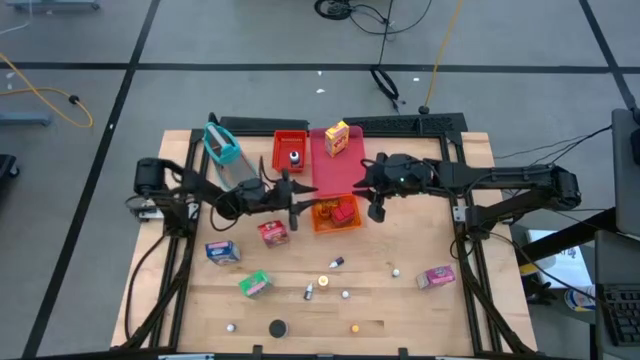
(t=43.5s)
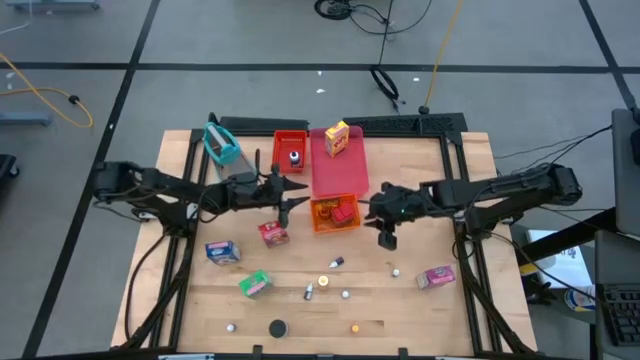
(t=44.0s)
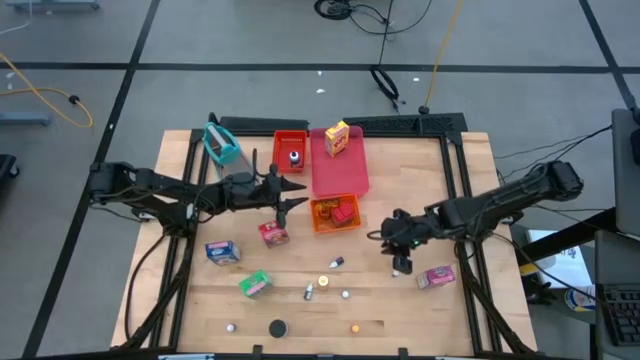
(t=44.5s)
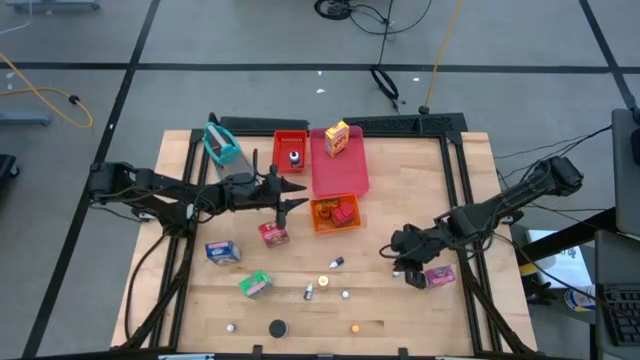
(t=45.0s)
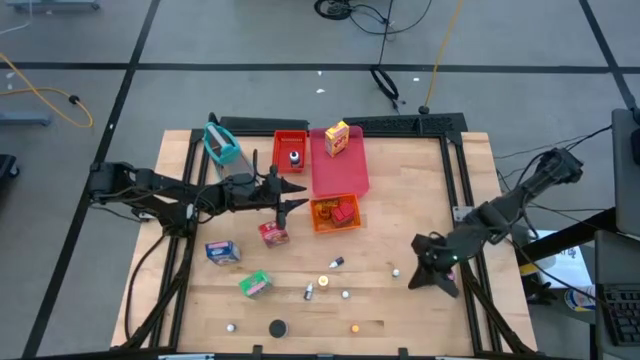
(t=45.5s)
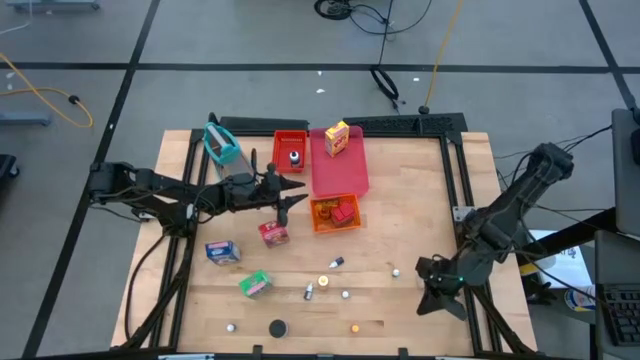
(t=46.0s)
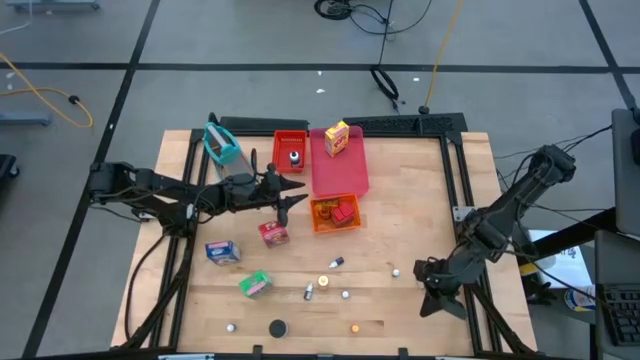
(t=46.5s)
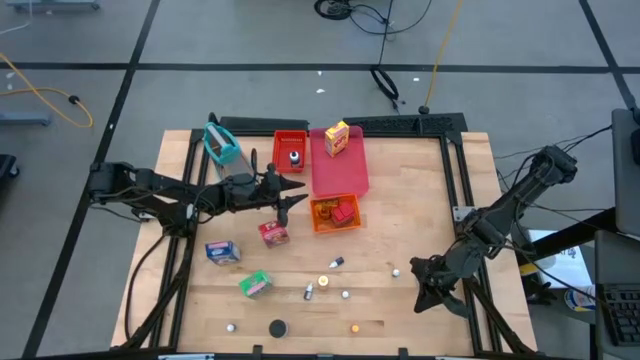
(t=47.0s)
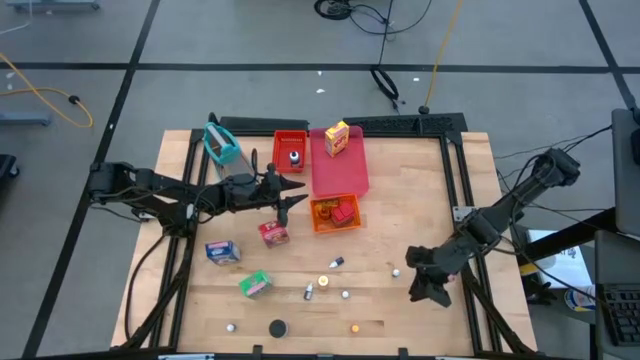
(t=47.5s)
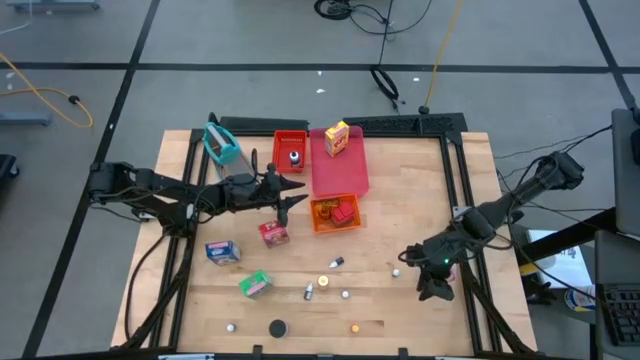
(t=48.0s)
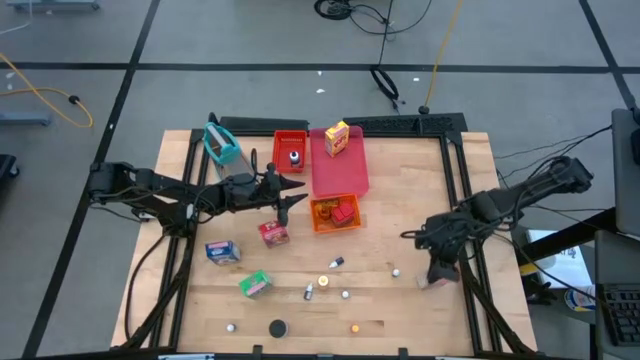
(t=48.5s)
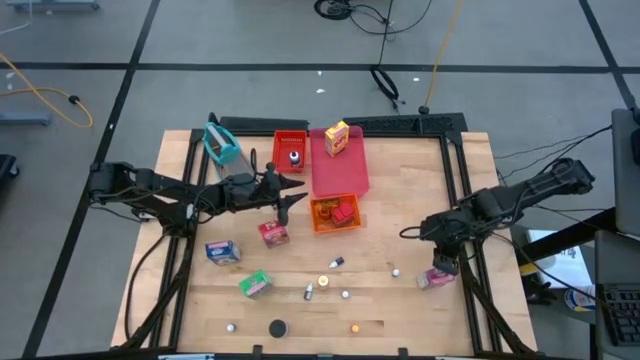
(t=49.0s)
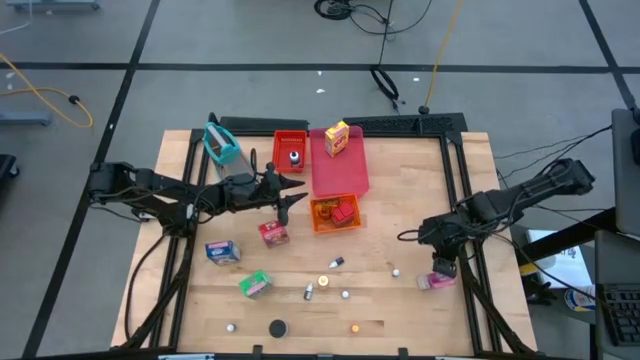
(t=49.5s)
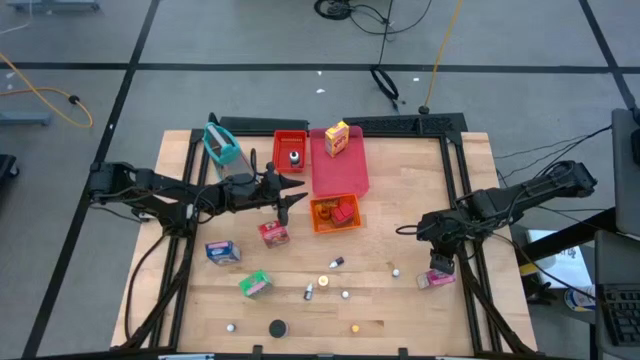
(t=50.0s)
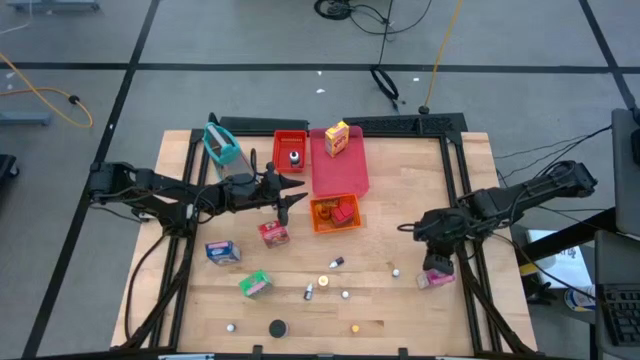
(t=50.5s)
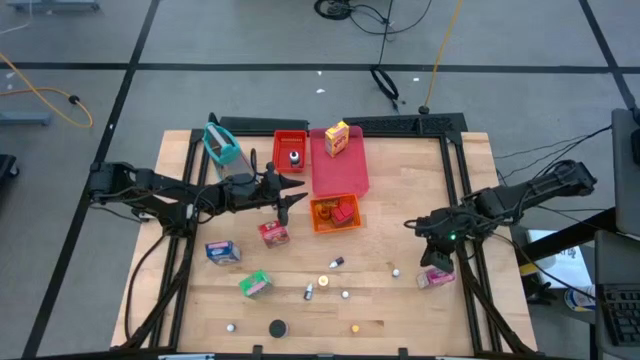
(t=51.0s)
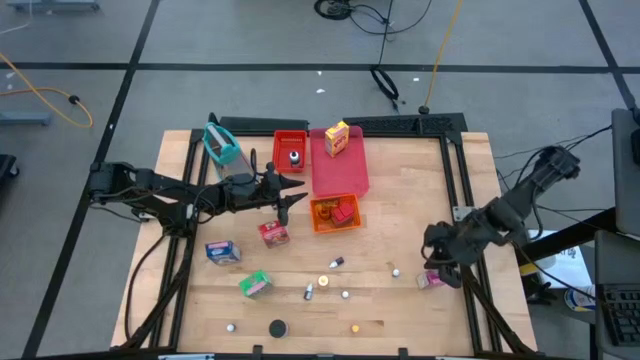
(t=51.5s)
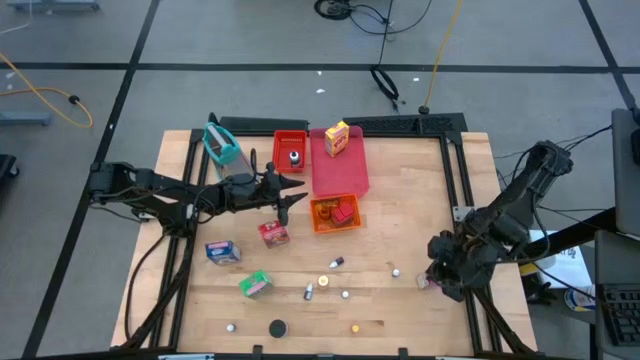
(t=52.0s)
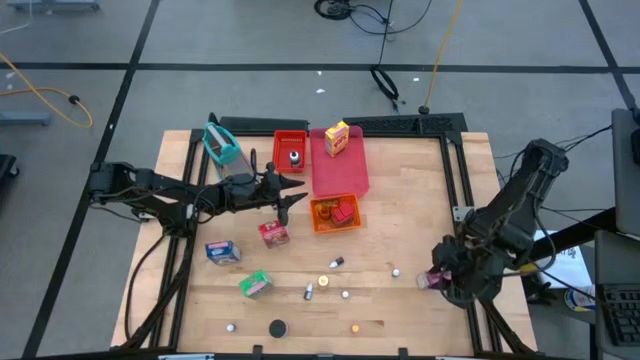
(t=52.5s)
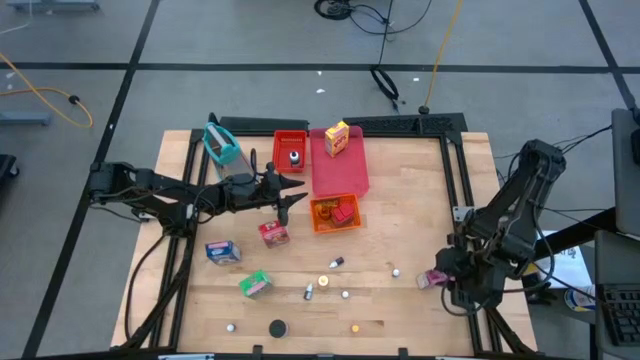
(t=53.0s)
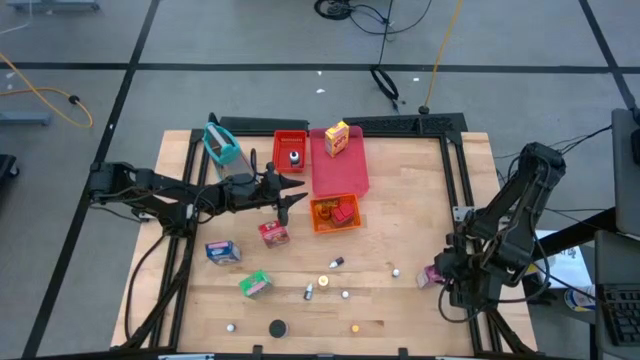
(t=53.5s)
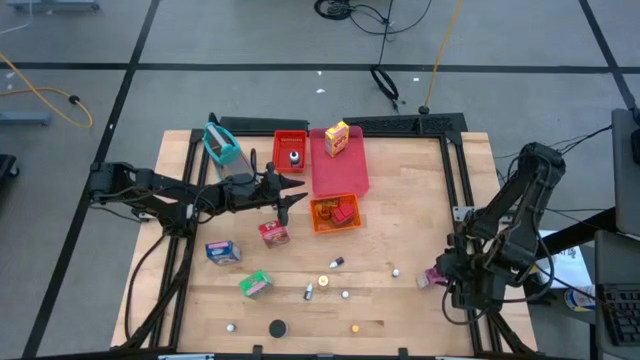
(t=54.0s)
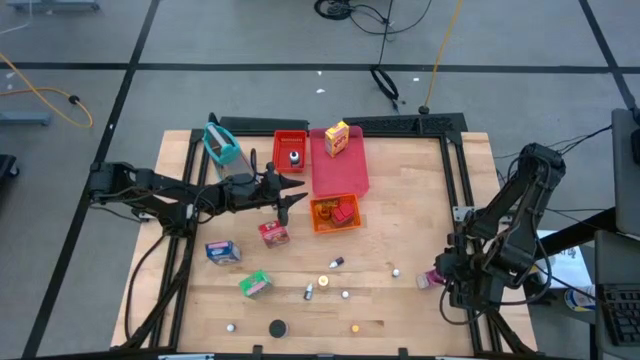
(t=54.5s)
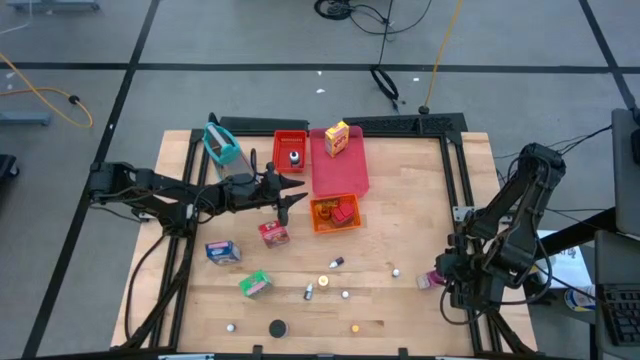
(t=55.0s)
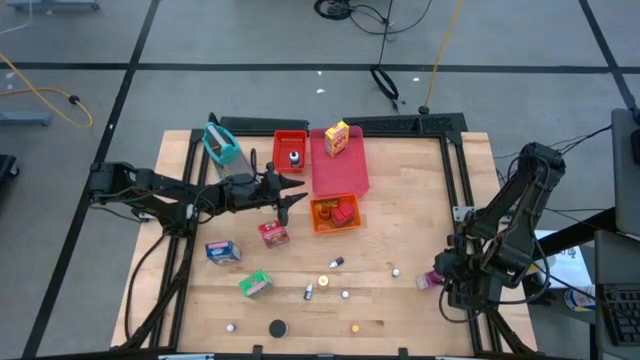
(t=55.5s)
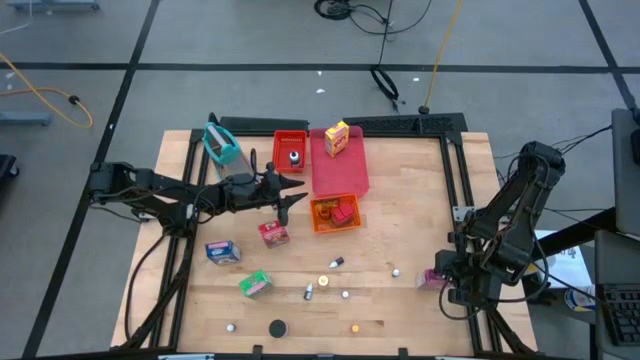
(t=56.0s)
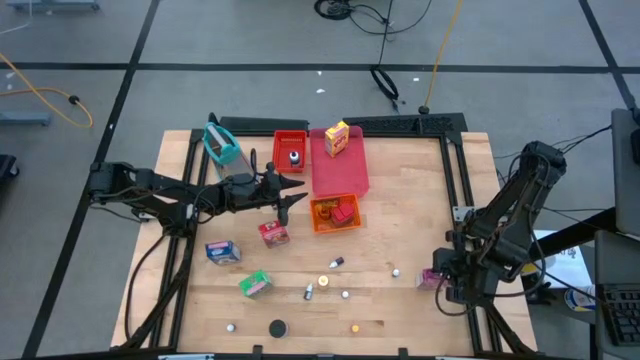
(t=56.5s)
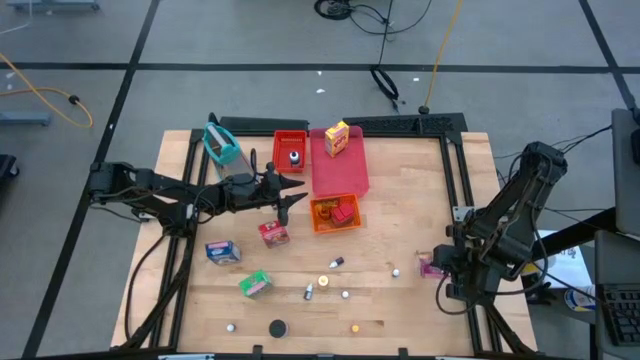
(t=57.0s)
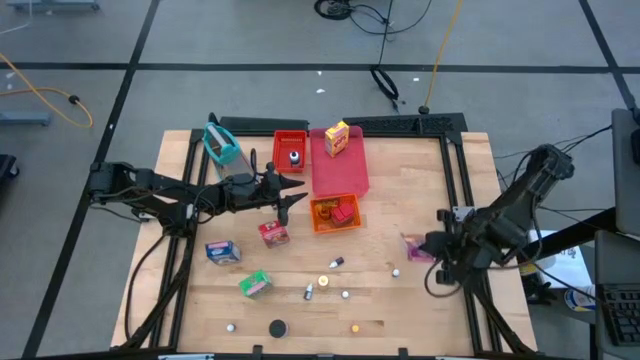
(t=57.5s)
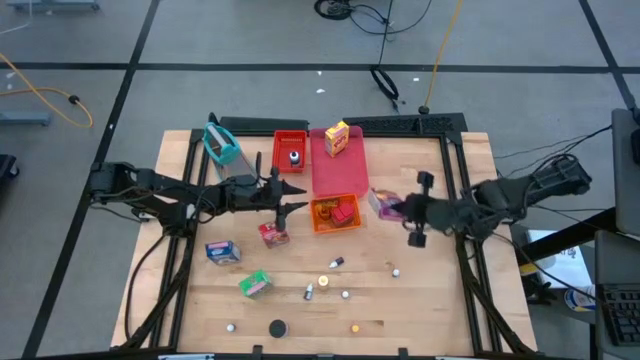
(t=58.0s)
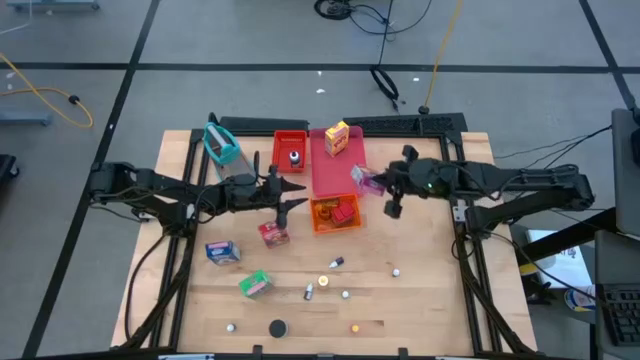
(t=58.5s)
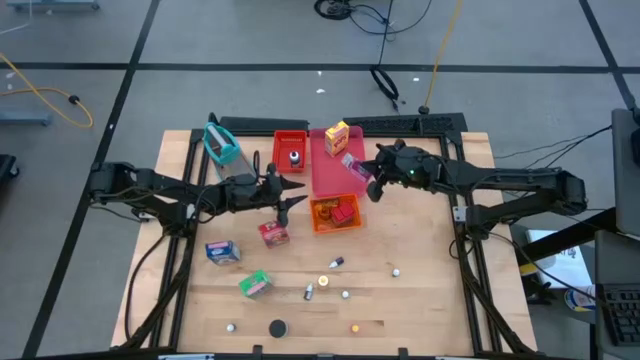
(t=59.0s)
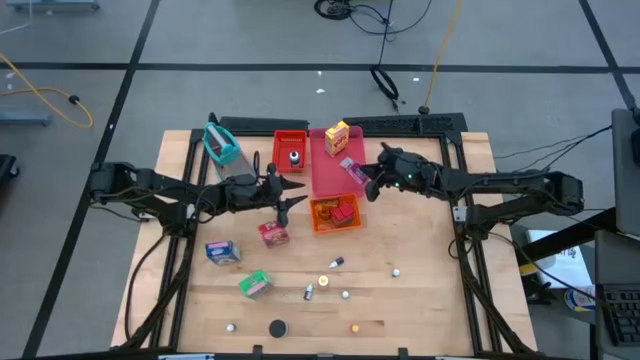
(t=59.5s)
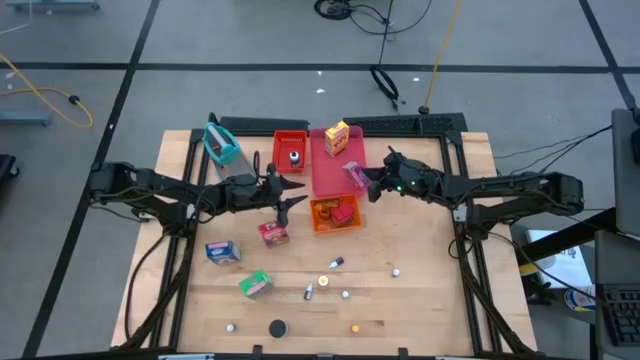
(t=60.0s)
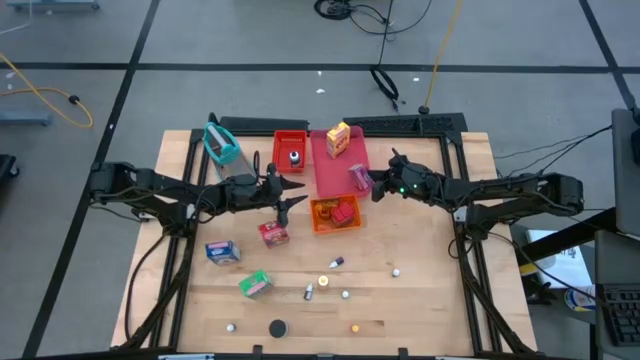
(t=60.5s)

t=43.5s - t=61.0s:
Task: Pick & Place Kitchen Items
Put the purple cereal box into the pink bin

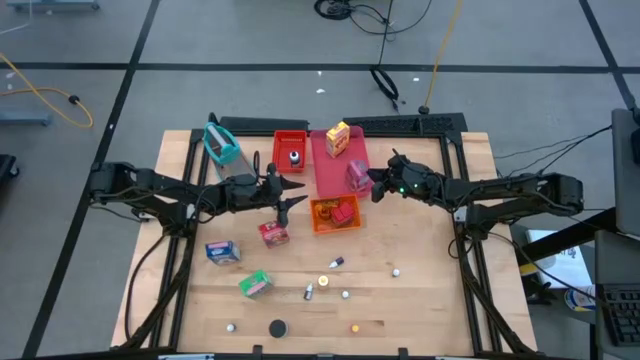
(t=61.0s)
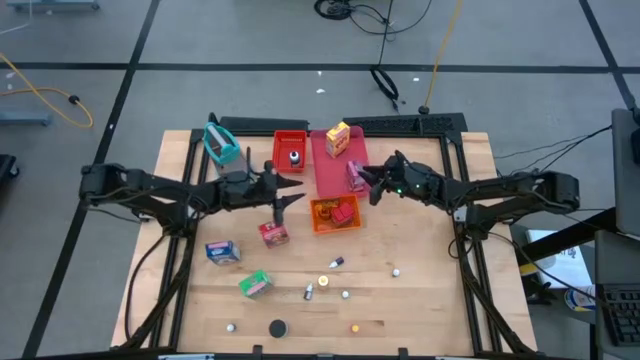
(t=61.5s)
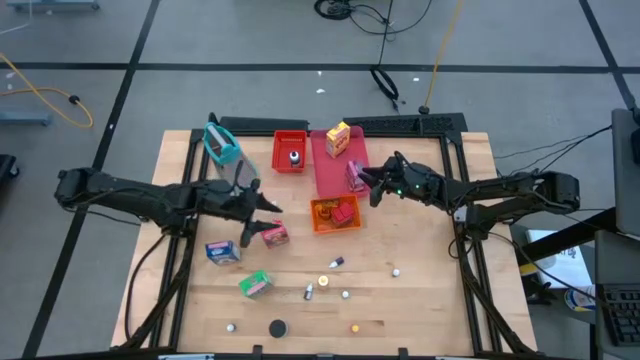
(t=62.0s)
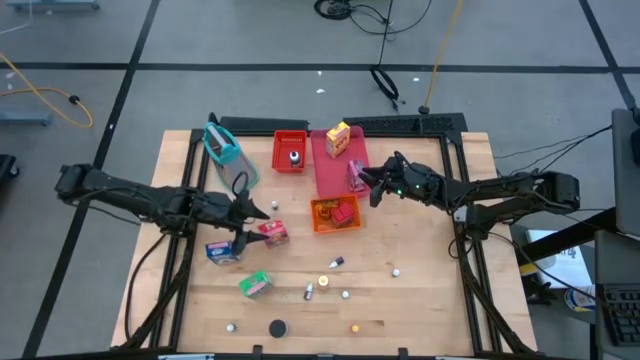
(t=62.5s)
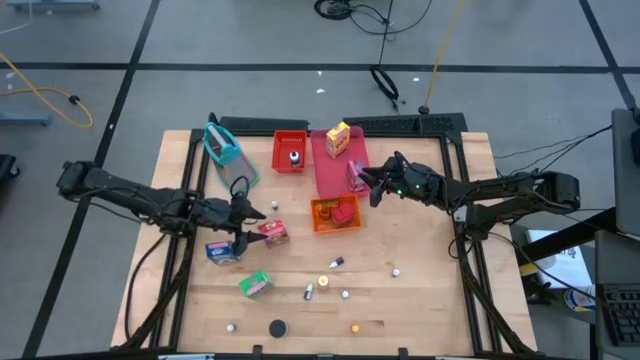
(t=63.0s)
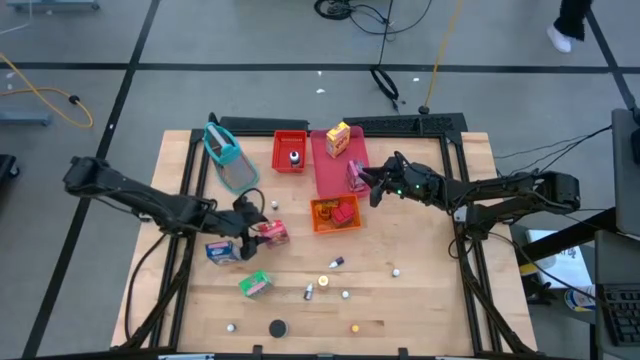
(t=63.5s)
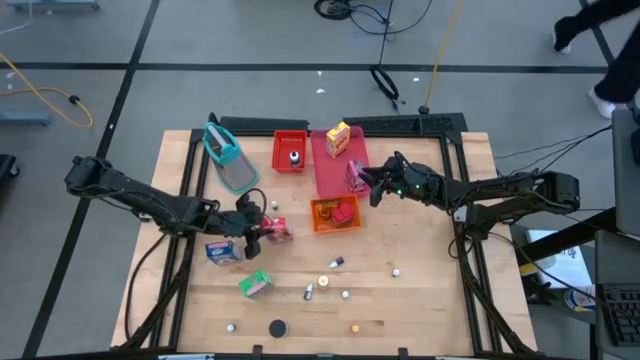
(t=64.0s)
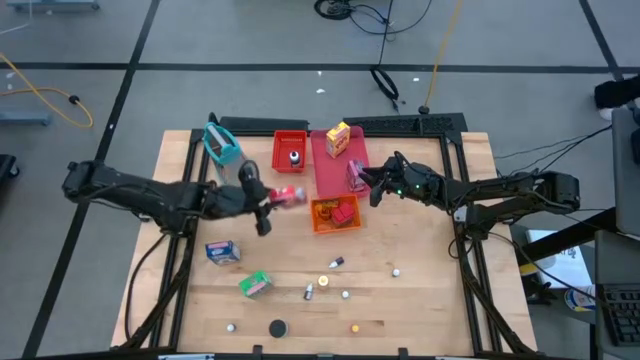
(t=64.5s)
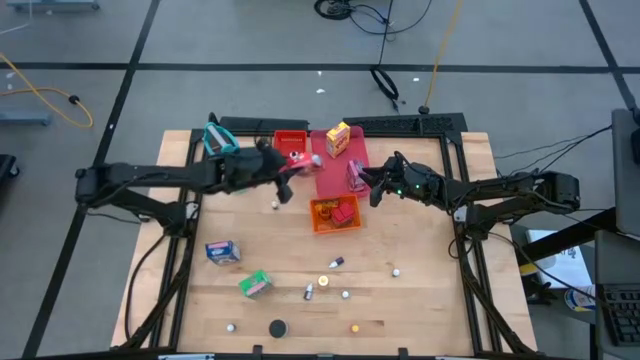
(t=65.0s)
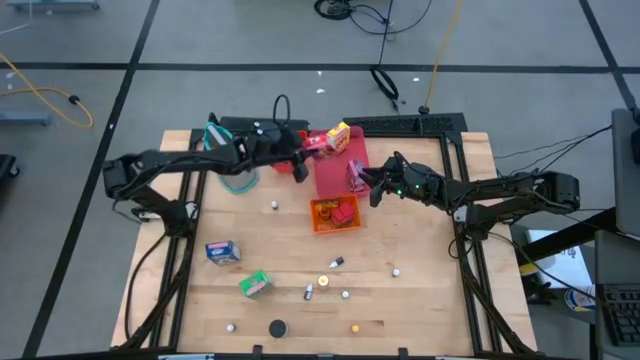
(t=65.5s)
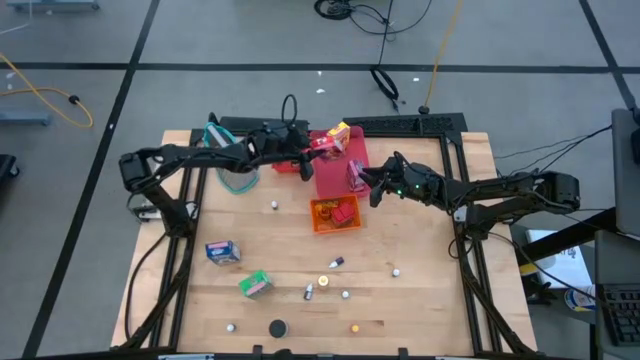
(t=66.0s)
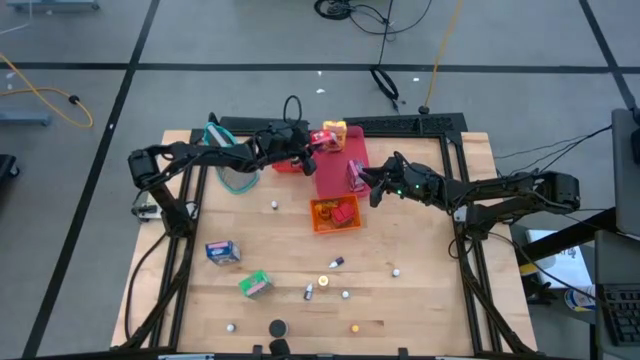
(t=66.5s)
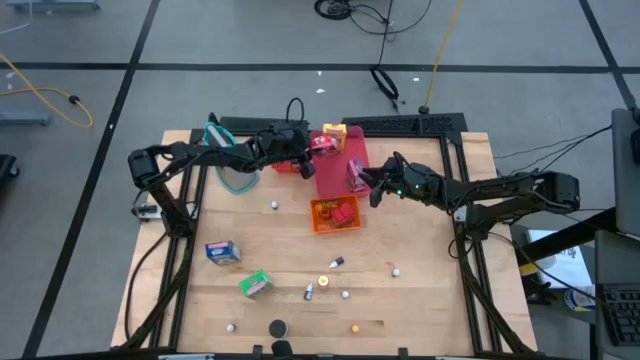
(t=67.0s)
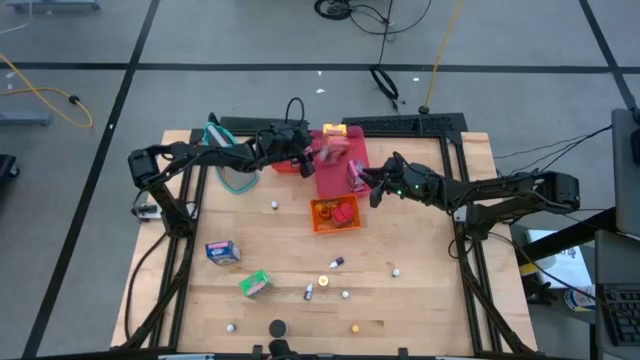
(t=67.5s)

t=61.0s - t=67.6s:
Put the red cereal box into the pink bin
